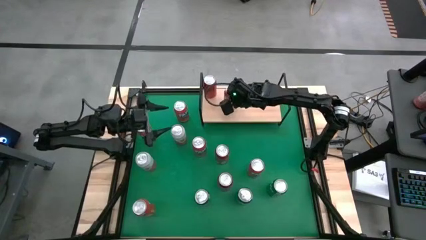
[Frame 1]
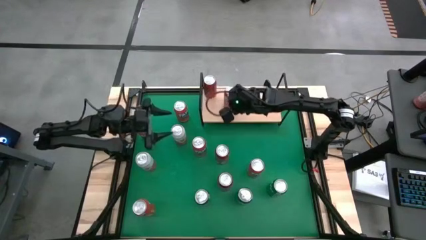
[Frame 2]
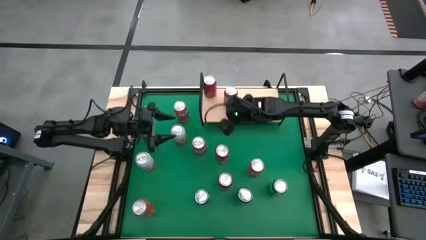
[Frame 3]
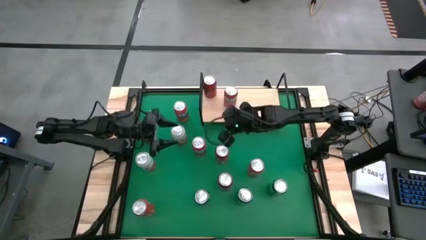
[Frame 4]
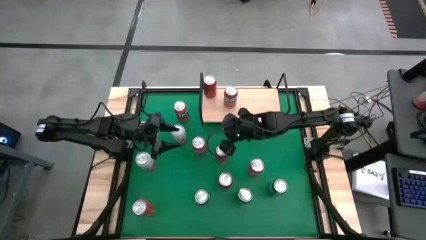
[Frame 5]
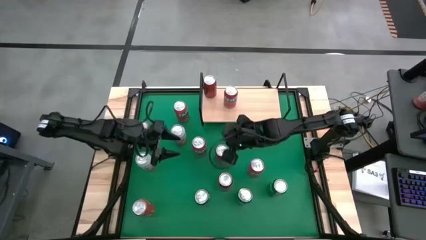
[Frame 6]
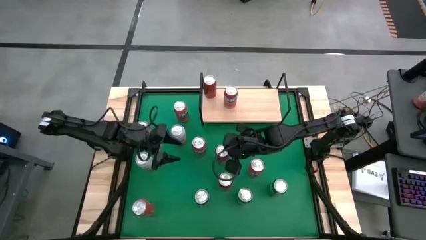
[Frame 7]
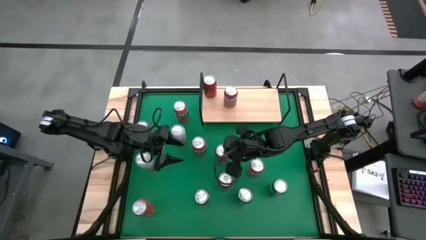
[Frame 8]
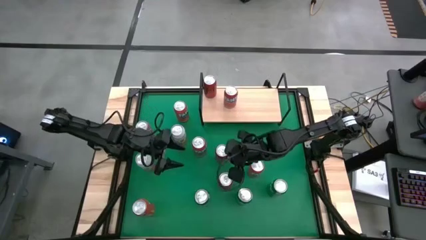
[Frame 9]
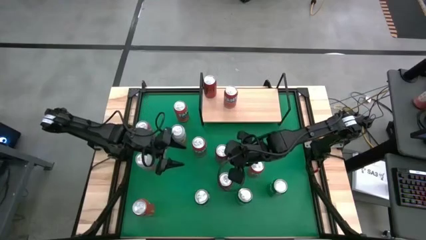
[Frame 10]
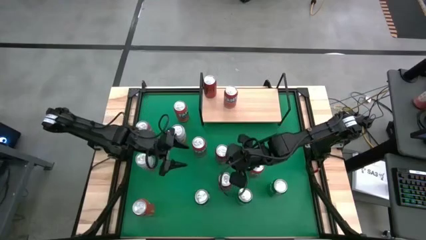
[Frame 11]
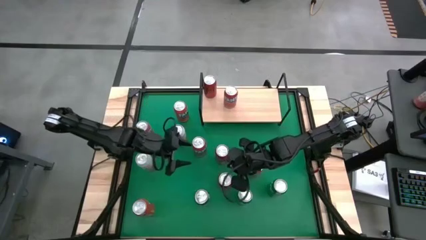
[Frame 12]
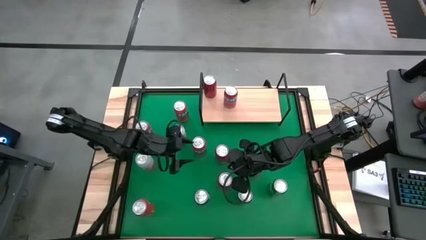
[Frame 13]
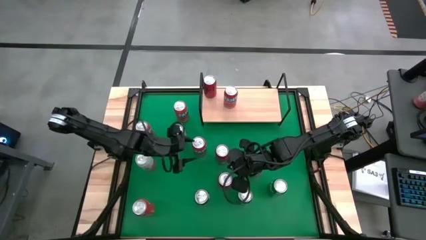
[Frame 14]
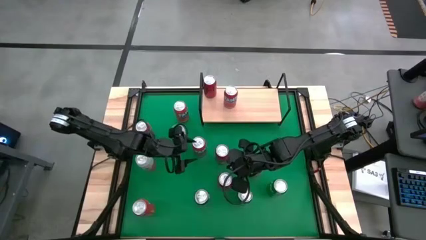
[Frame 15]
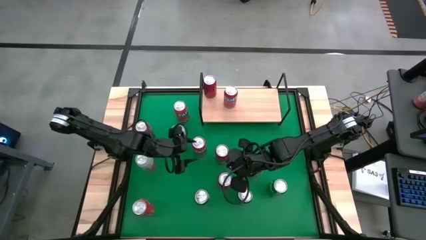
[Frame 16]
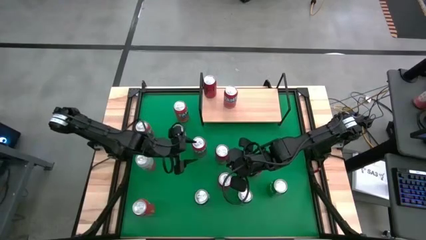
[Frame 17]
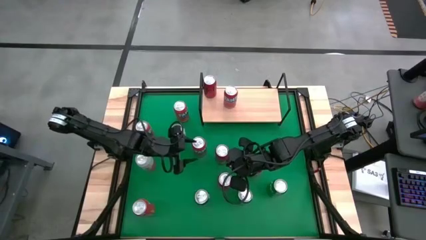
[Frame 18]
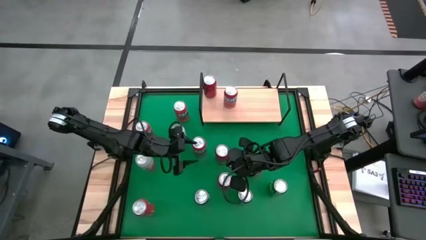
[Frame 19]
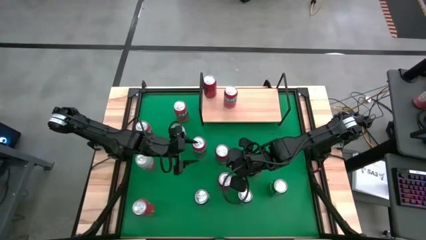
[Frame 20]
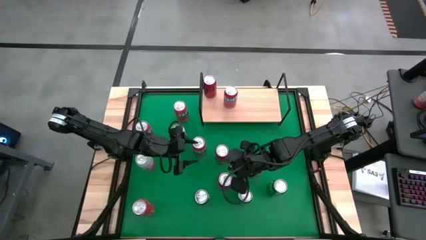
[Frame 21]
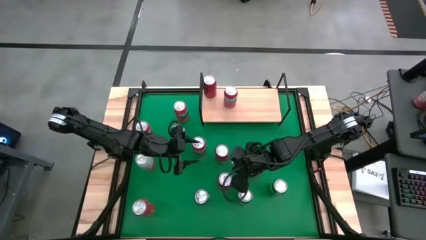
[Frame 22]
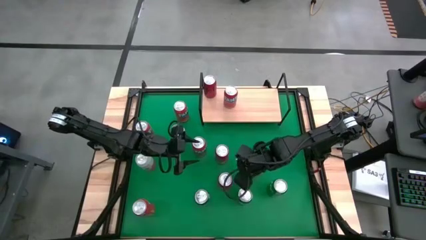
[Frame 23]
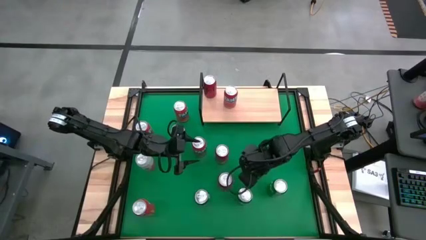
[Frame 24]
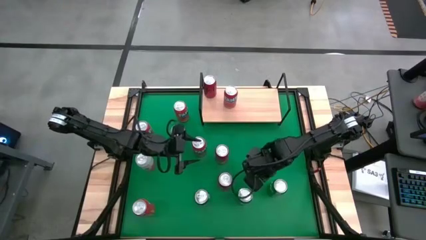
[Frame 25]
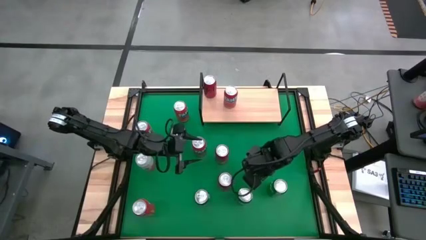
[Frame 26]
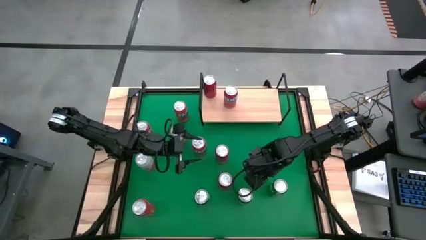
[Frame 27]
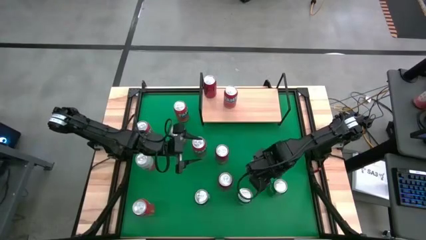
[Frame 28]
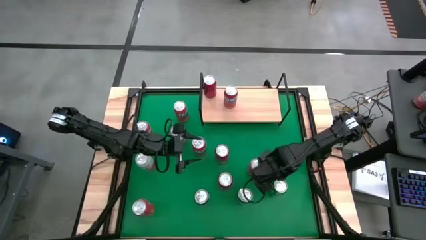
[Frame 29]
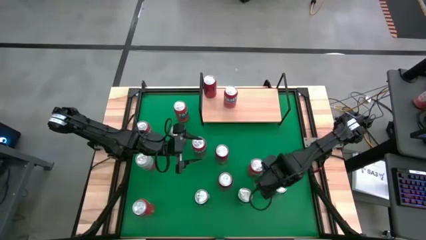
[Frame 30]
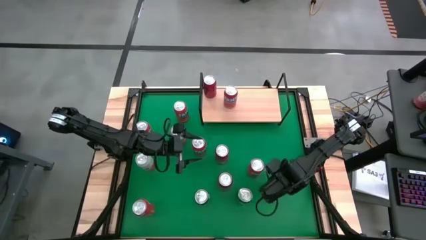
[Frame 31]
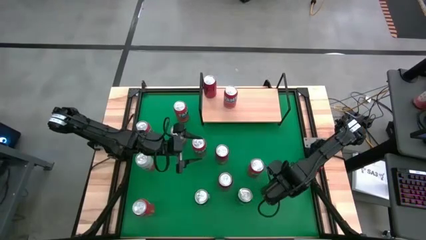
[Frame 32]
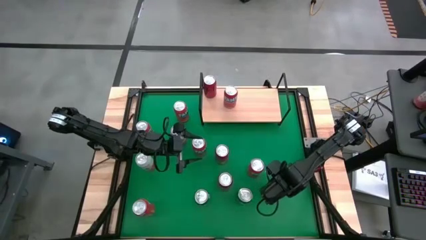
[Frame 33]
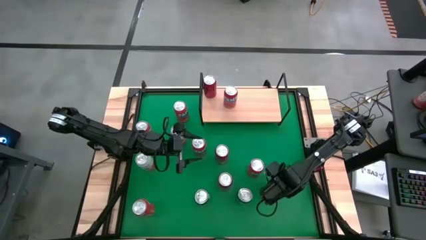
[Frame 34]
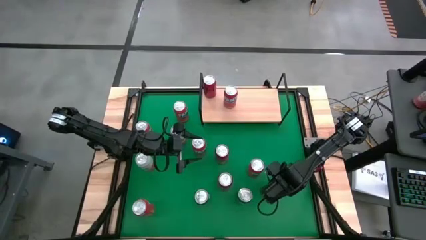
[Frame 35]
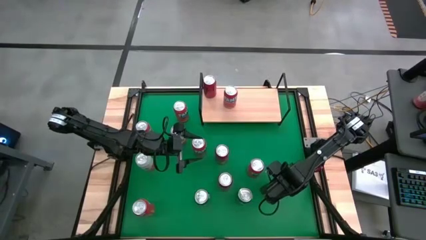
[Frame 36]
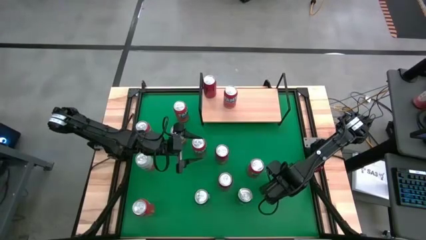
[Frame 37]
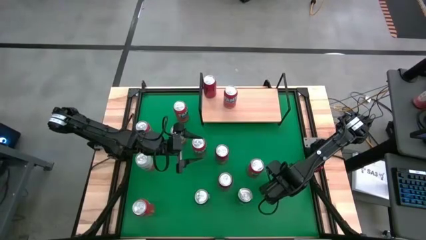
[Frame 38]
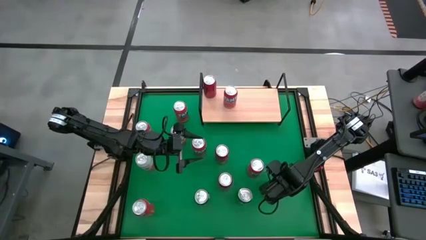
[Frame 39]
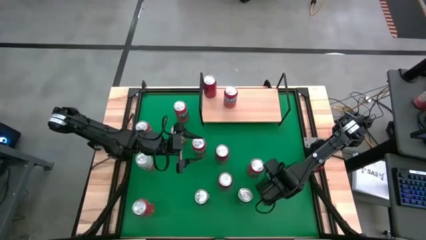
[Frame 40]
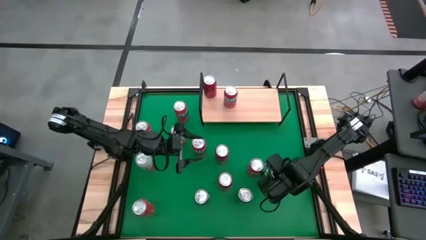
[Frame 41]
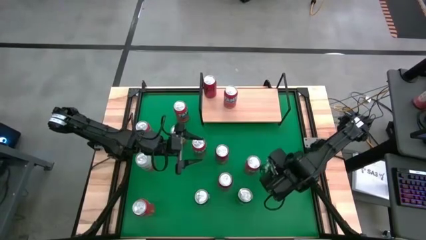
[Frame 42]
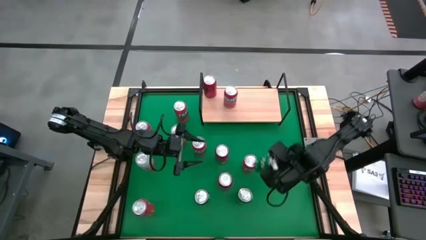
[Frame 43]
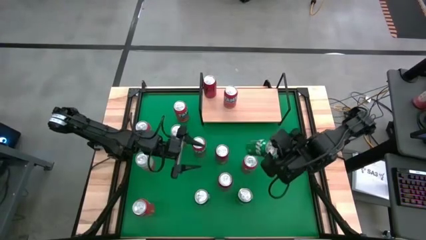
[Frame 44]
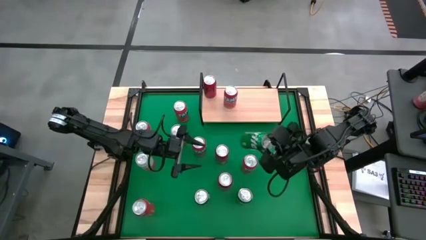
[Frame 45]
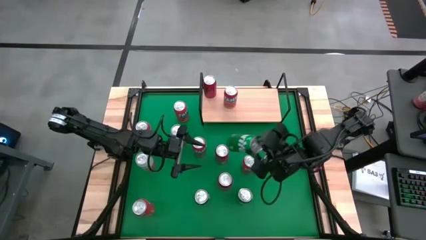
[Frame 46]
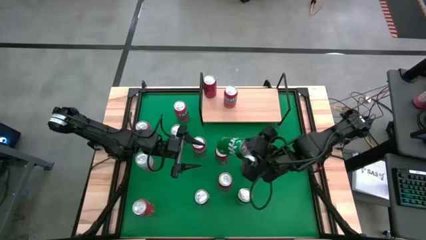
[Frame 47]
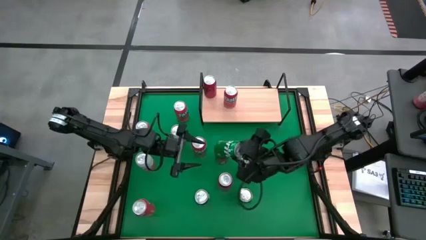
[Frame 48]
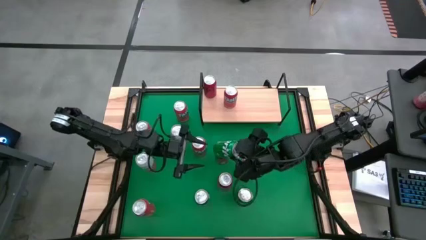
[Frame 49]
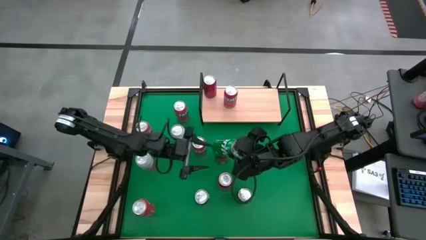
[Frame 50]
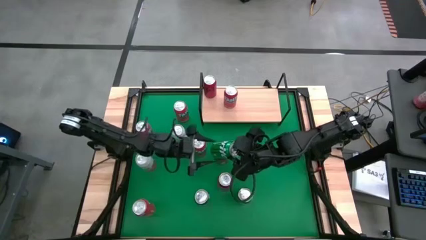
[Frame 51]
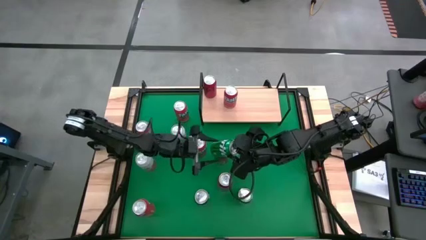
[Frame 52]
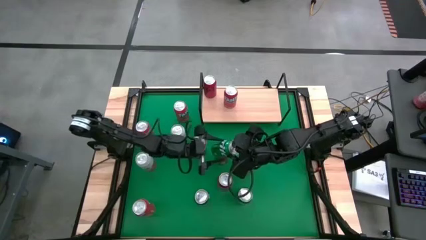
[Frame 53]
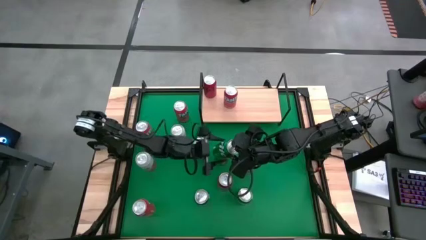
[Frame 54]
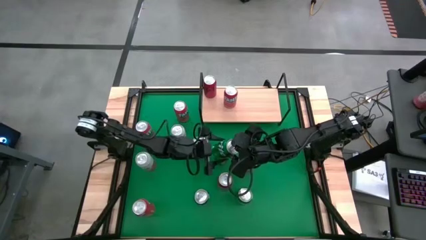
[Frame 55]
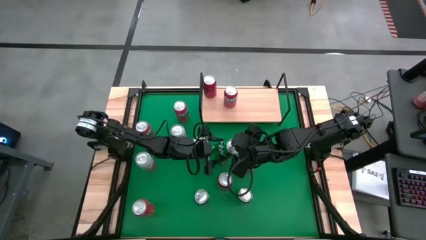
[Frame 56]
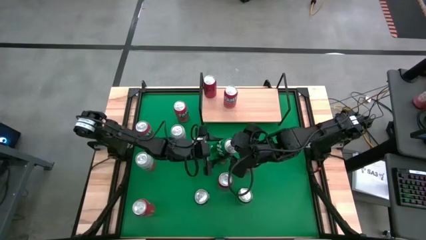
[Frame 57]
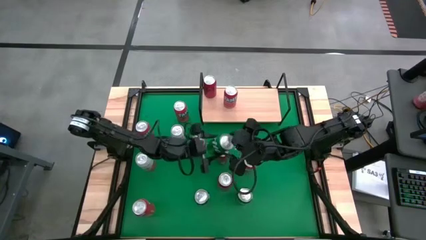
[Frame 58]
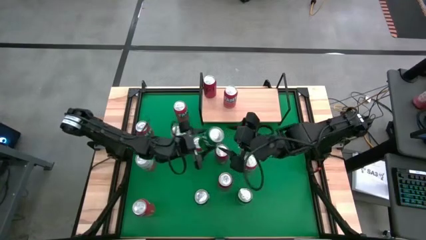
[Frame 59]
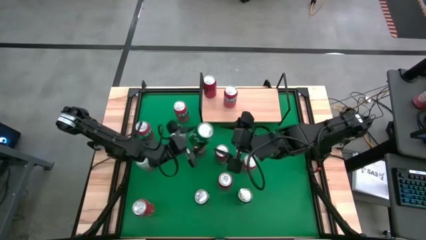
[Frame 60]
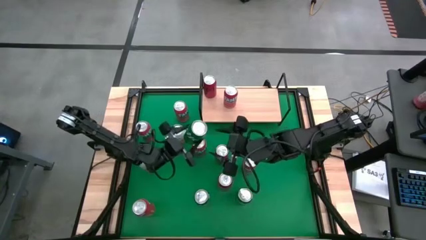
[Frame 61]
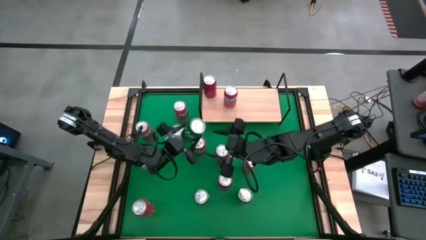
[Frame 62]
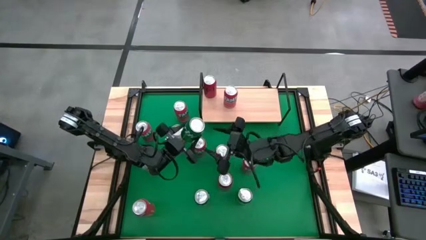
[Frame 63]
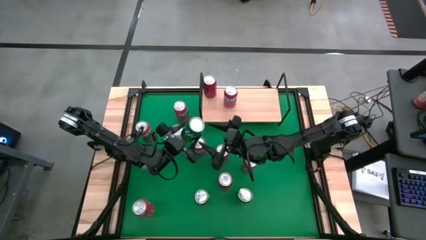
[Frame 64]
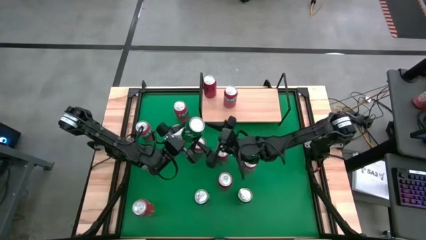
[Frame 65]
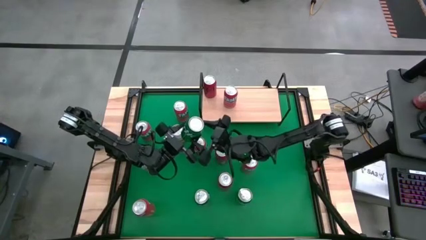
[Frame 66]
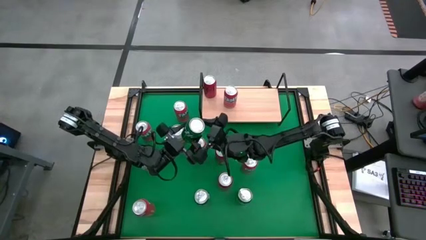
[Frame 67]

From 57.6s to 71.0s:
Task: Place canned beverage on shelf
Put the green soda can on the shelf
